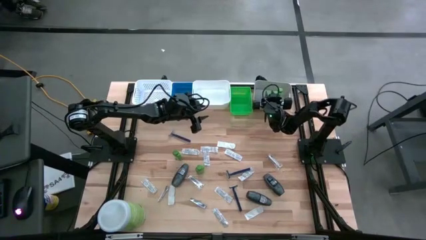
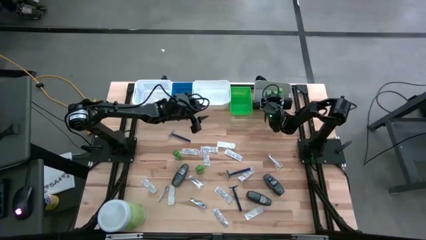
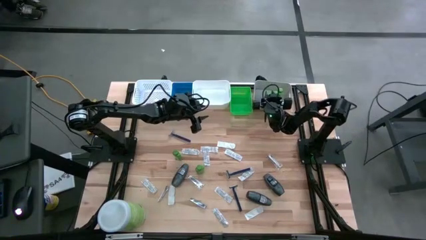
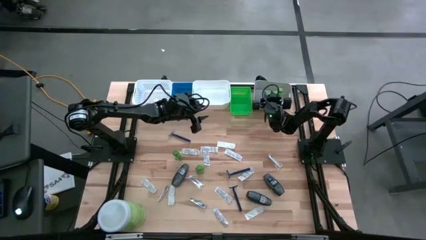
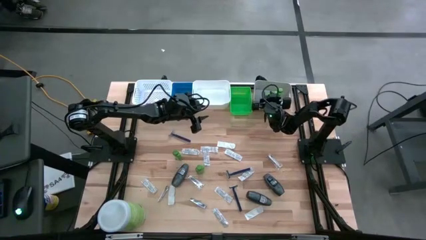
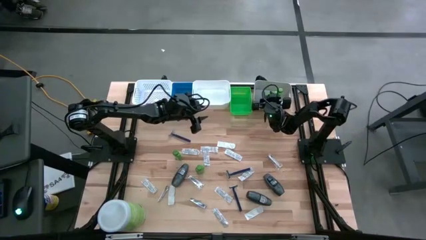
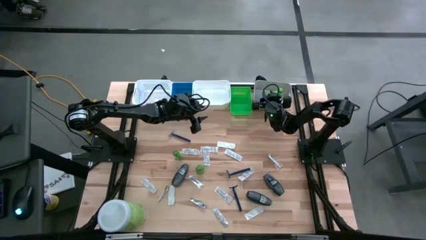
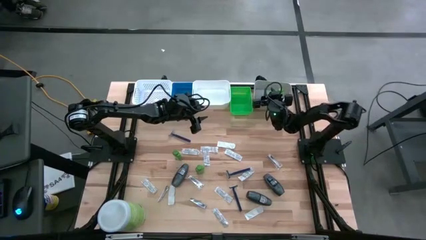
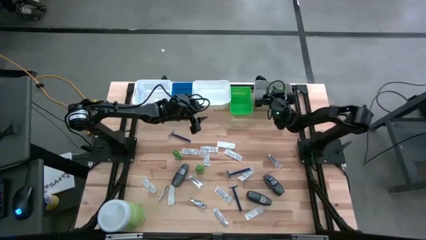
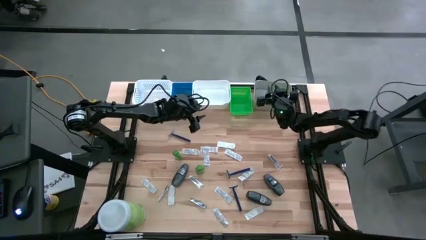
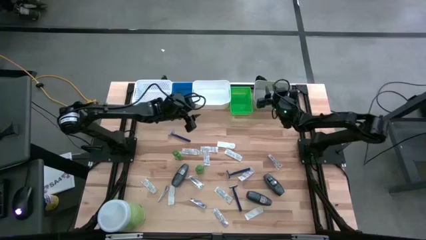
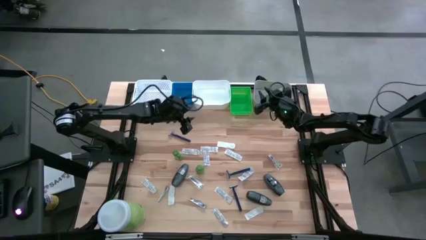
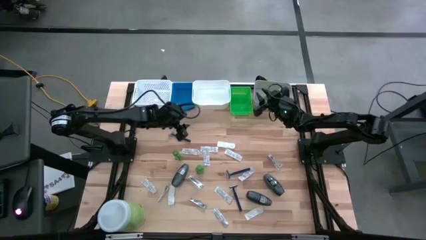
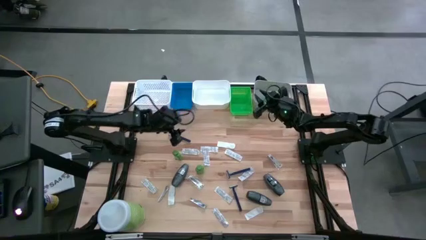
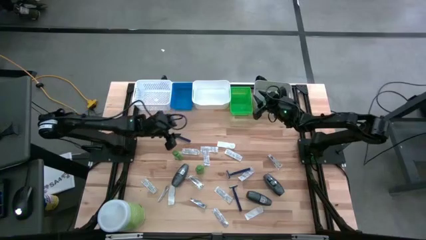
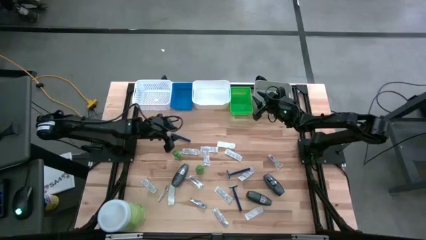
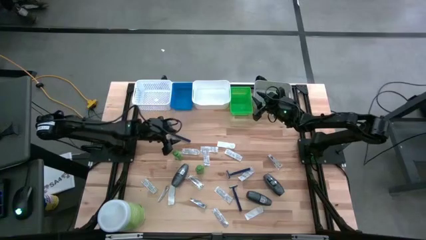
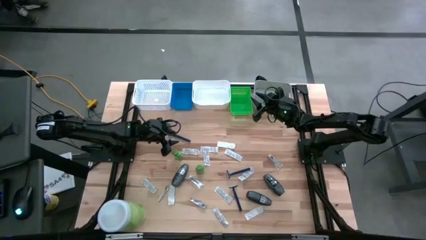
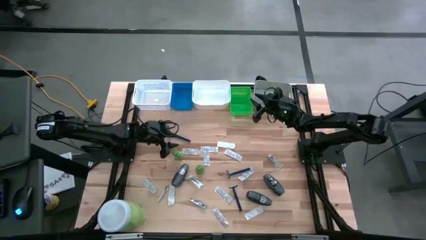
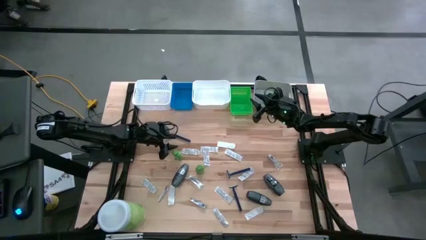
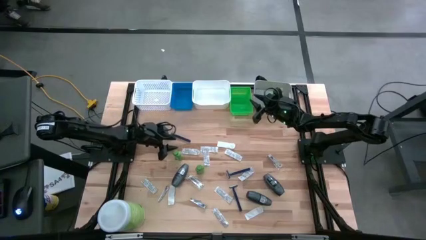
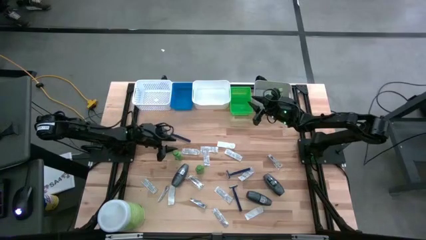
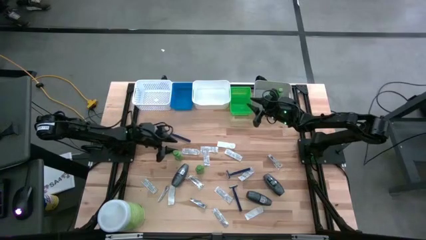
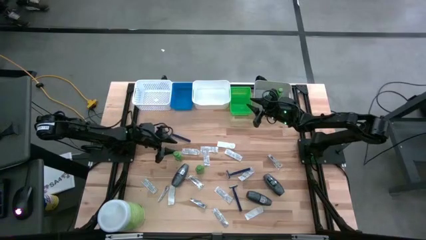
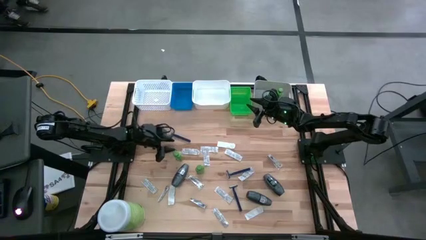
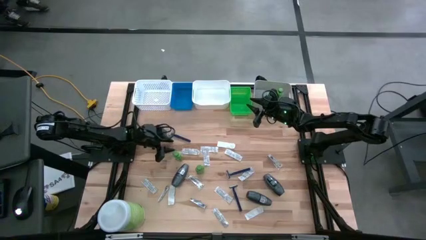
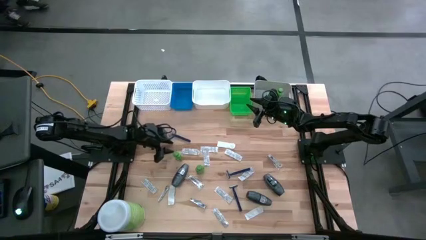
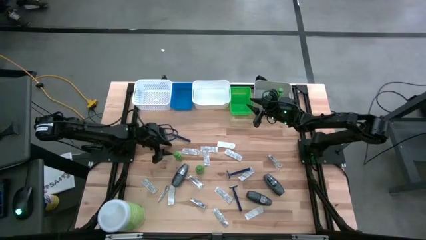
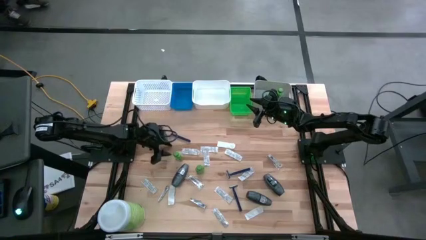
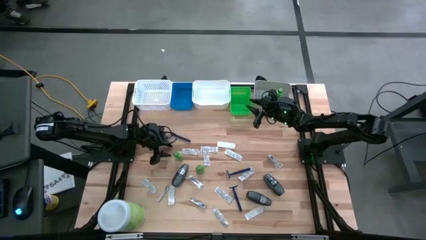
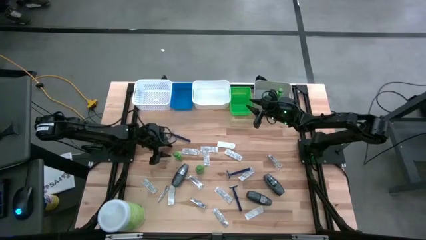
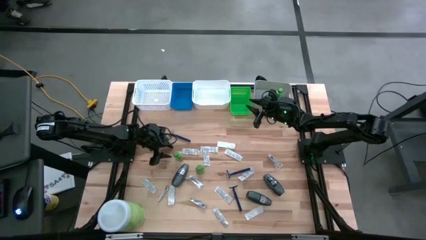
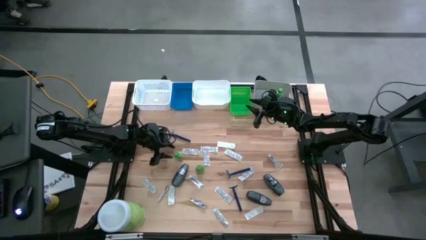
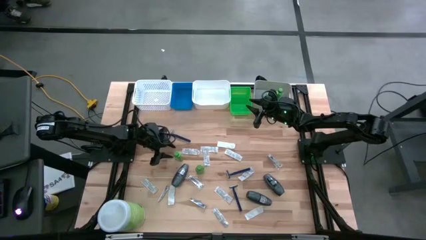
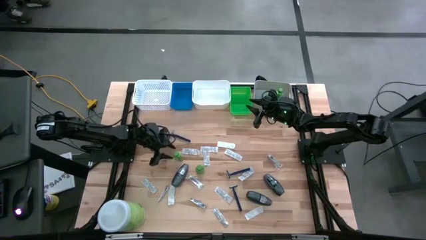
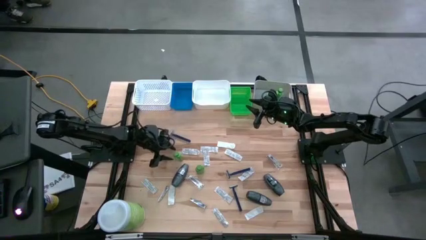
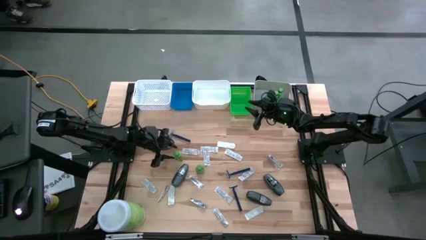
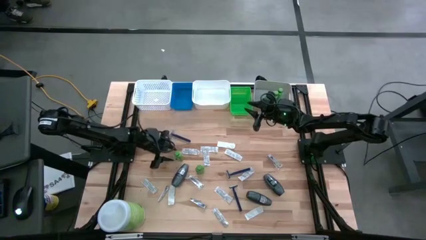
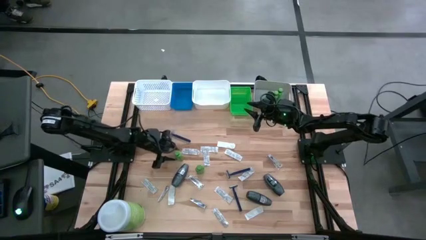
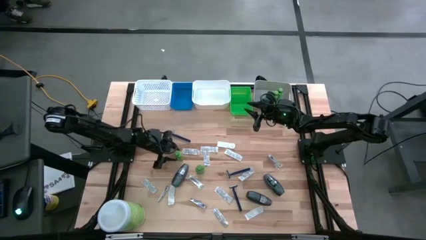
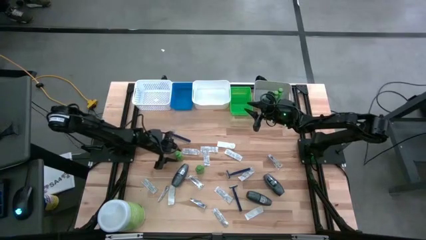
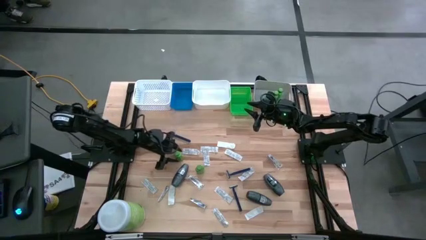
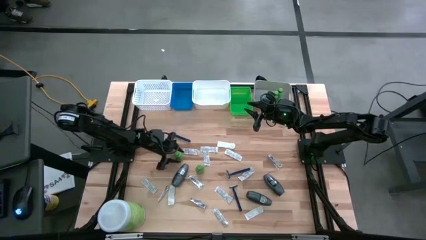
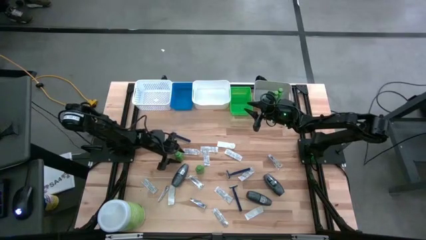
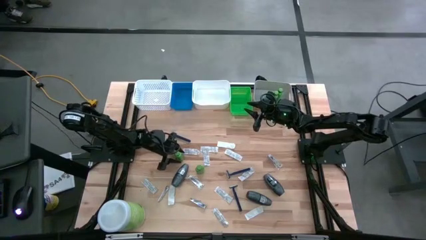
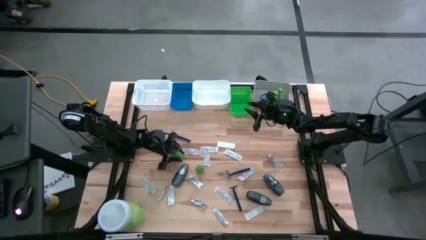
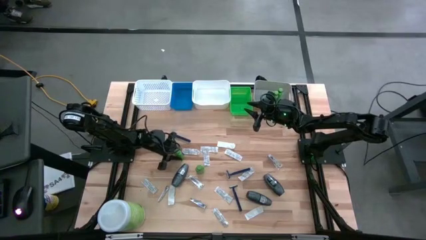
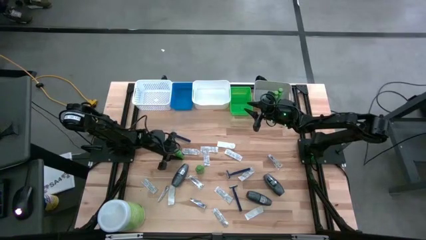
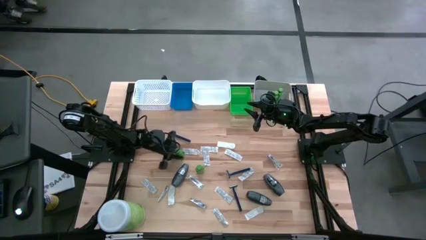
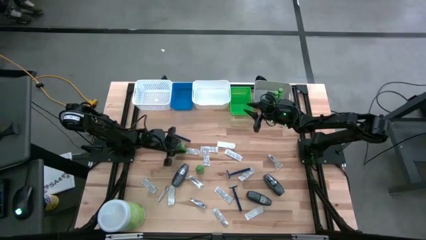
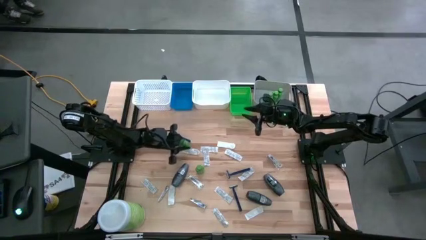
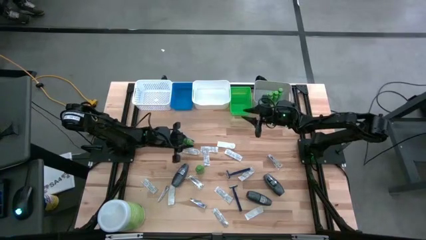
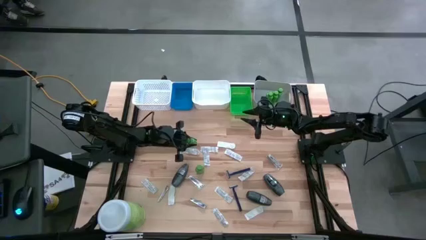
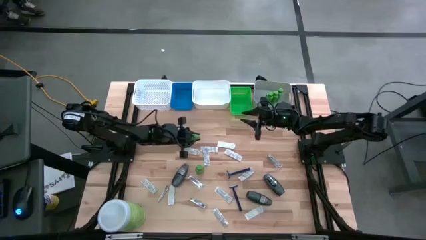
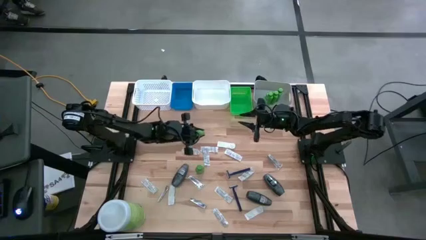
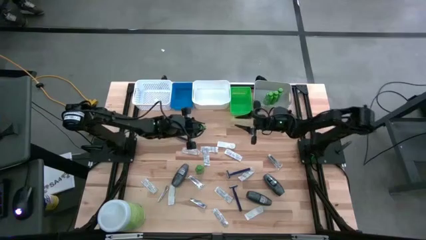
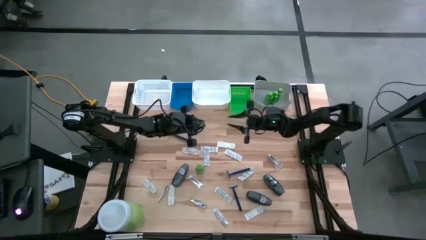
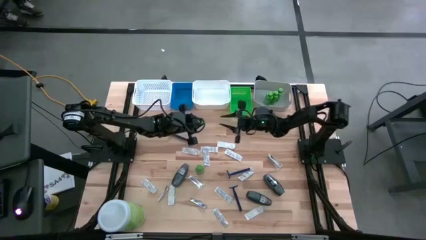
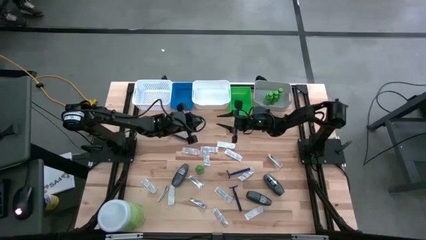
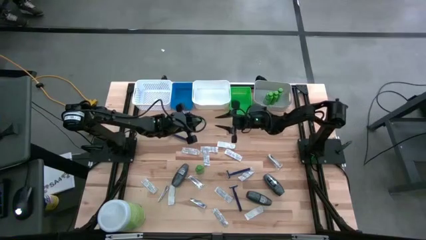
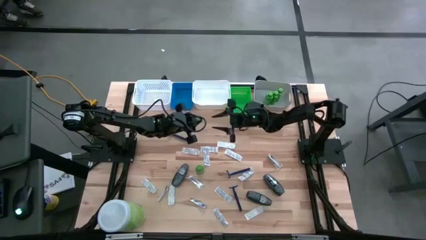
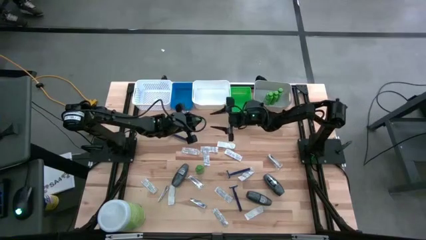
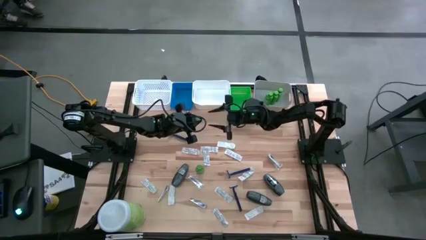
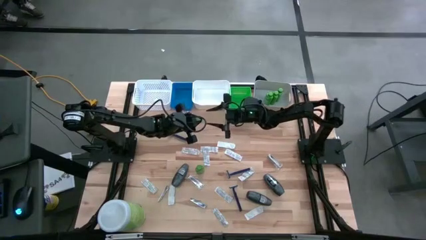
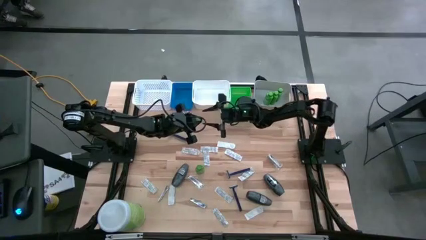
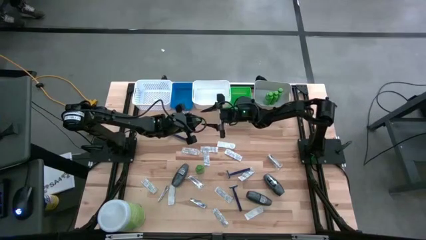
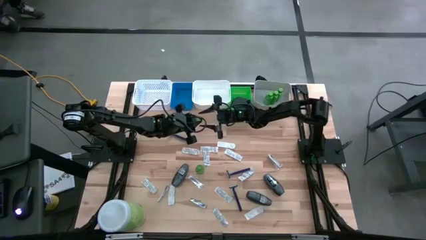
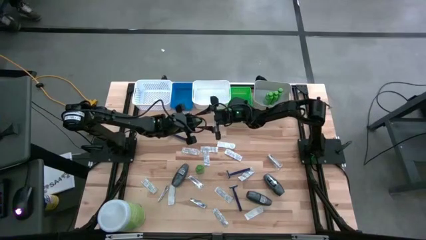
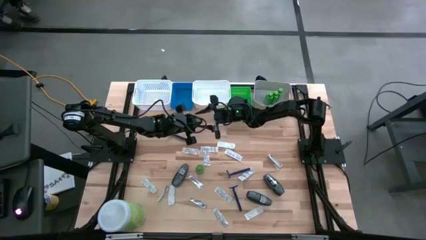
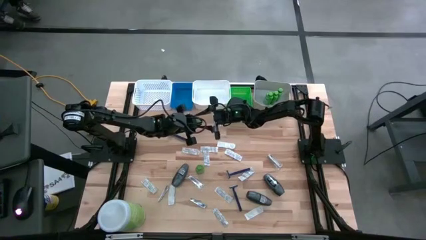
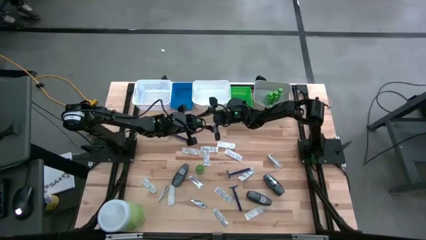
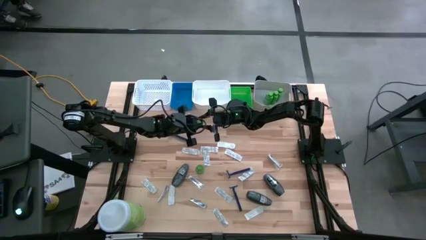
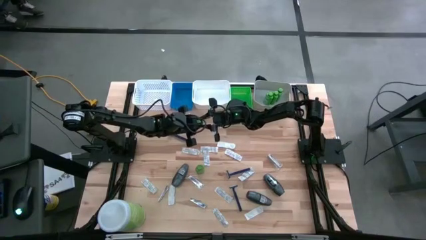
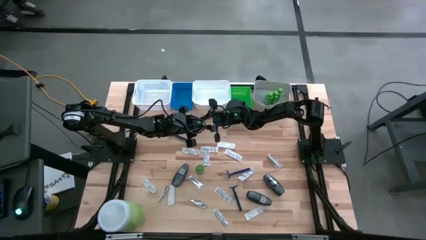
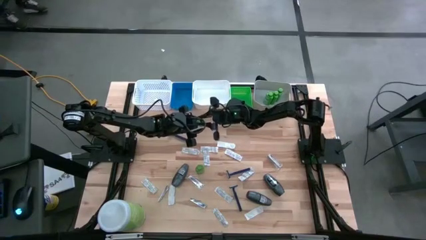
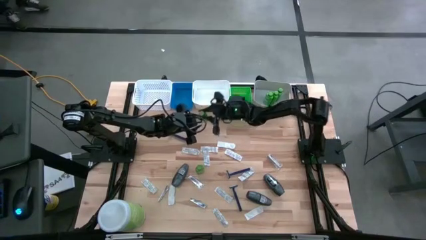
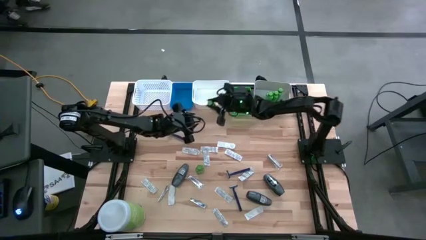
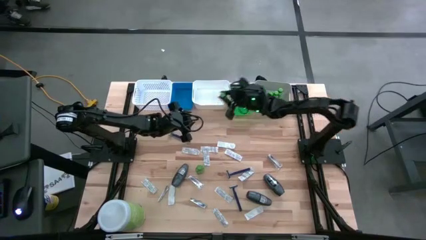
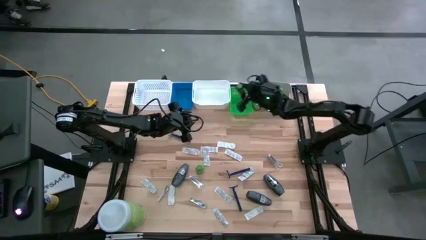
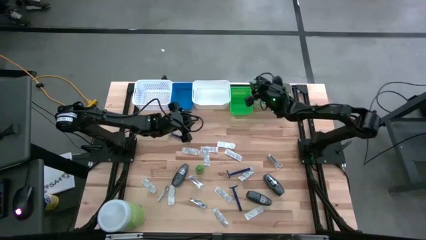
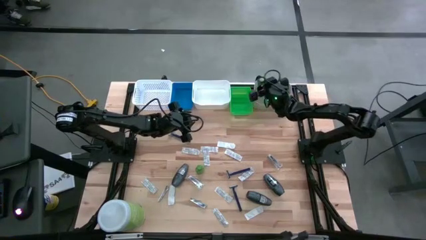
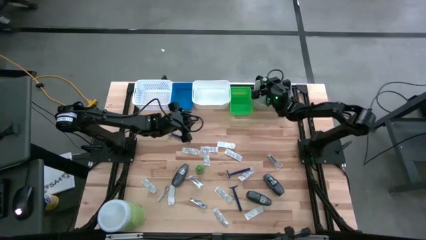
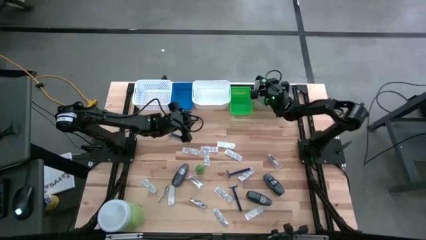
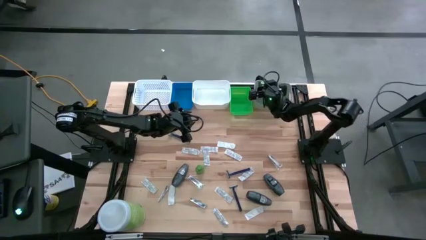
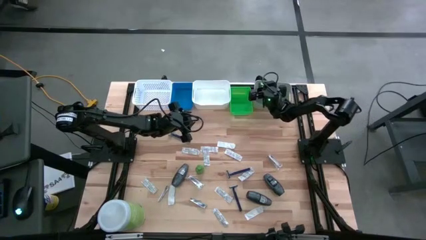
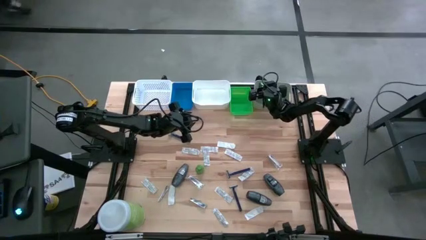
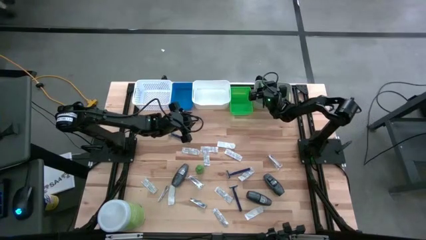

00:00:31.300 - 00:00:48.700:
Task: Pick & Place Travel size toiletries
Put the shampoo into the gray bin
